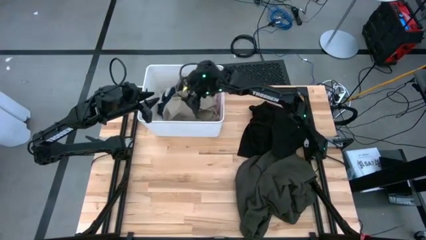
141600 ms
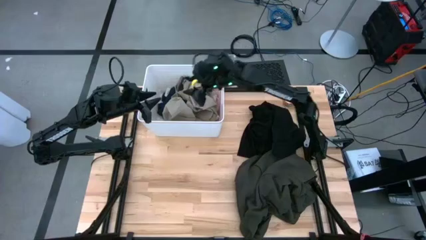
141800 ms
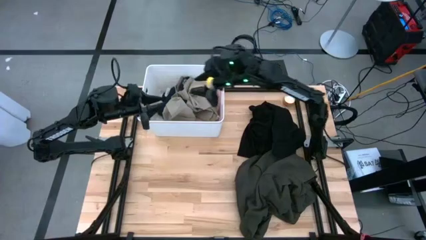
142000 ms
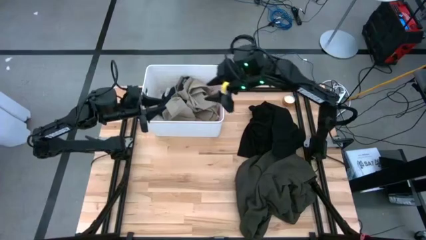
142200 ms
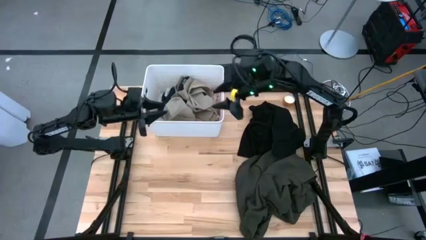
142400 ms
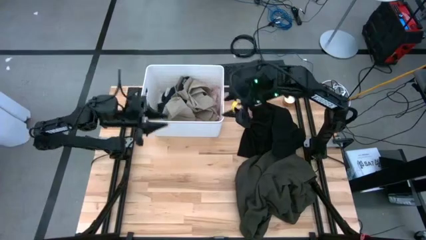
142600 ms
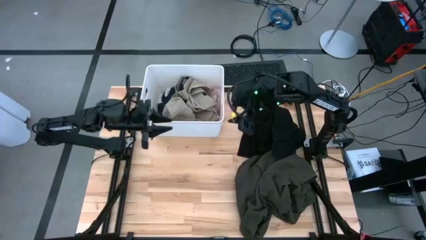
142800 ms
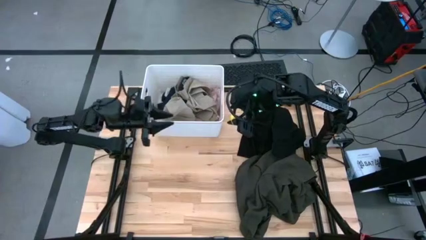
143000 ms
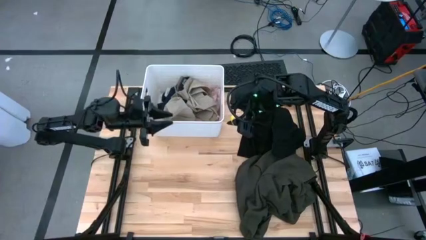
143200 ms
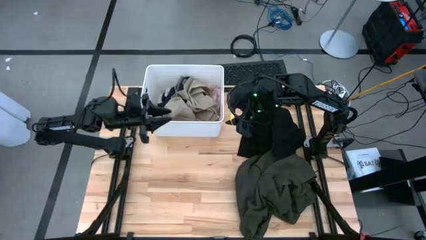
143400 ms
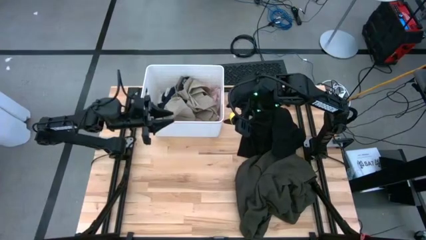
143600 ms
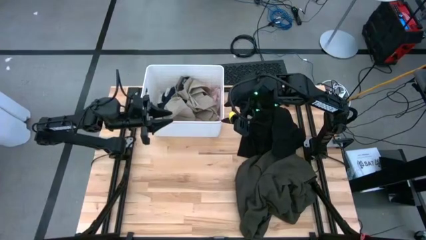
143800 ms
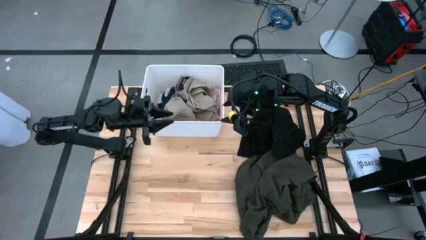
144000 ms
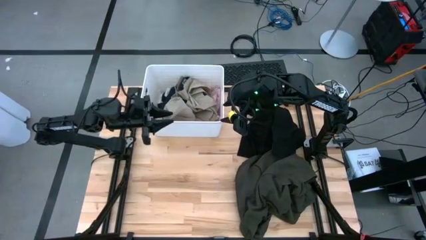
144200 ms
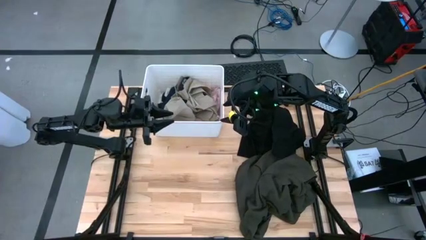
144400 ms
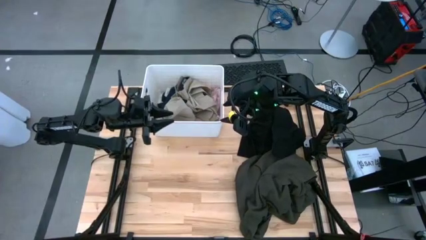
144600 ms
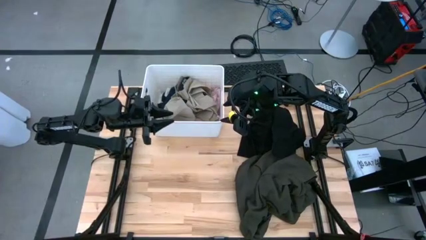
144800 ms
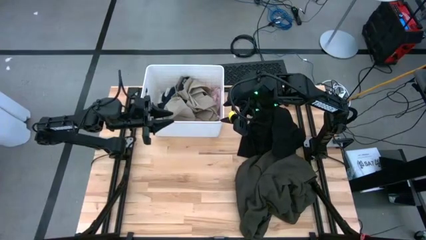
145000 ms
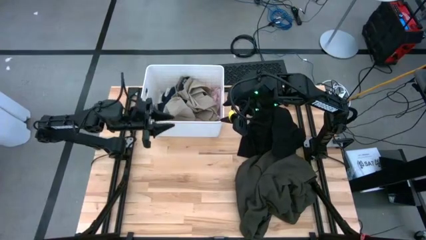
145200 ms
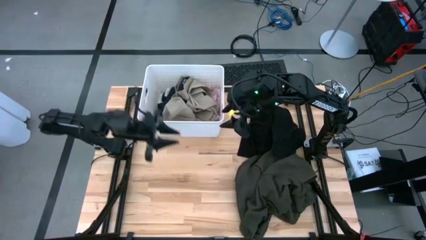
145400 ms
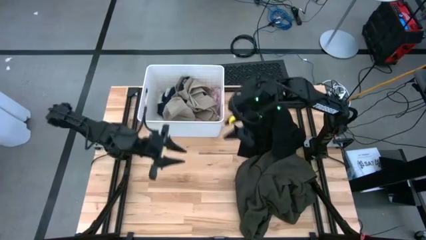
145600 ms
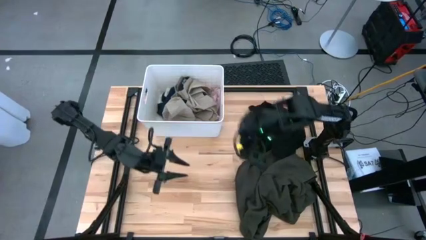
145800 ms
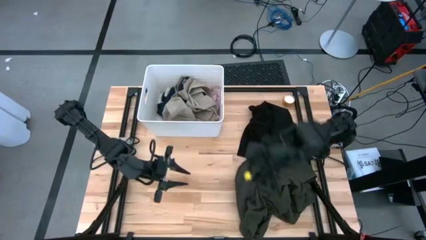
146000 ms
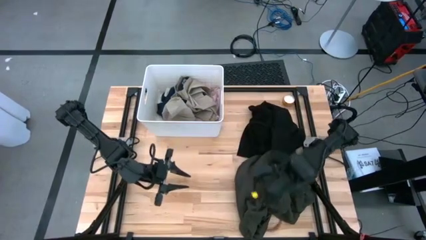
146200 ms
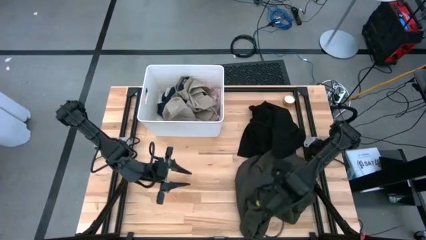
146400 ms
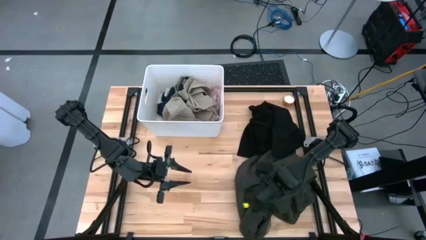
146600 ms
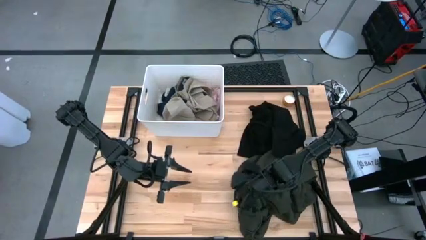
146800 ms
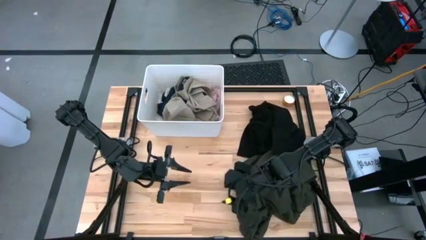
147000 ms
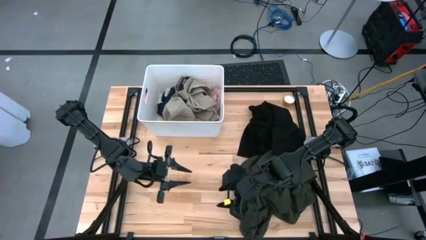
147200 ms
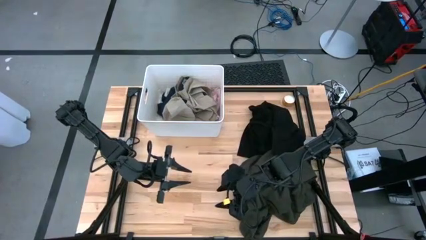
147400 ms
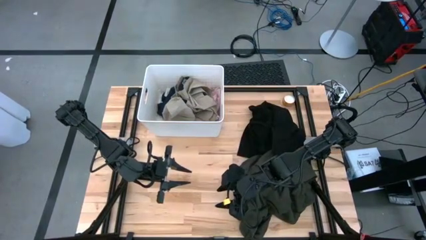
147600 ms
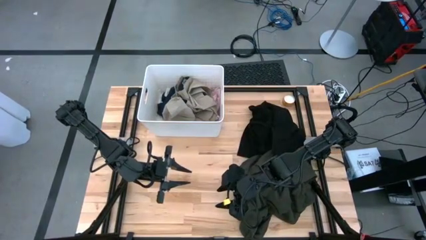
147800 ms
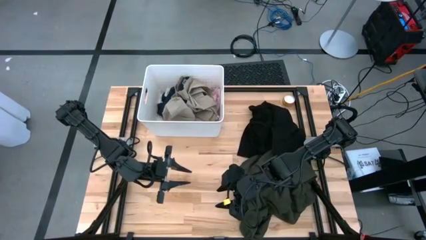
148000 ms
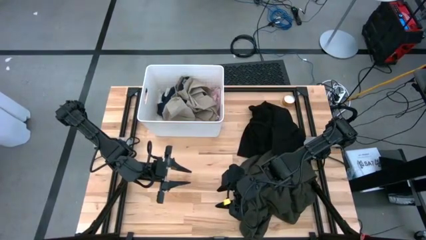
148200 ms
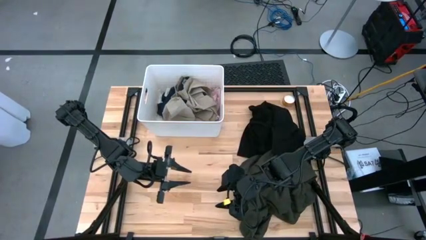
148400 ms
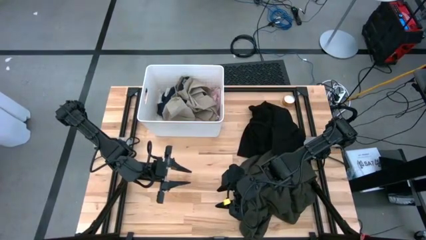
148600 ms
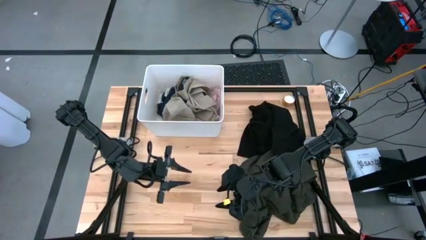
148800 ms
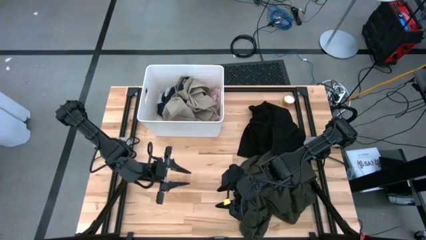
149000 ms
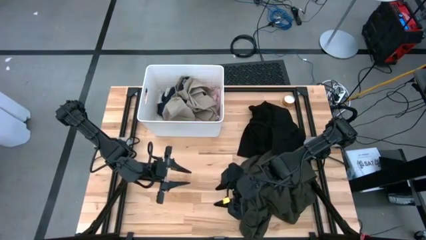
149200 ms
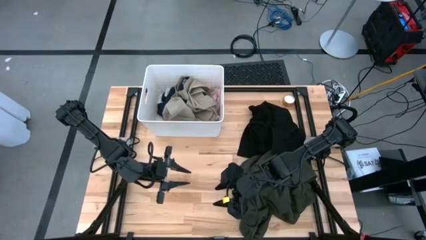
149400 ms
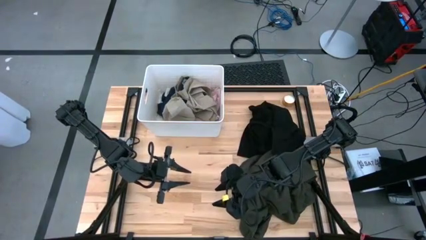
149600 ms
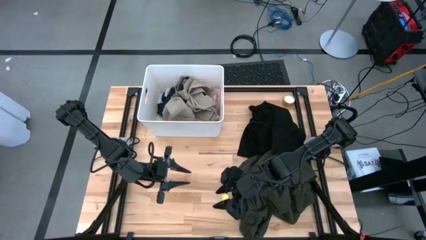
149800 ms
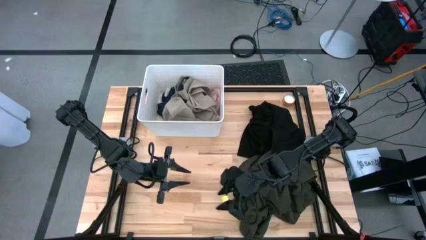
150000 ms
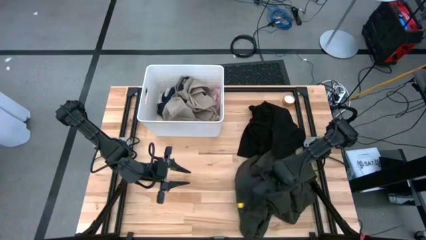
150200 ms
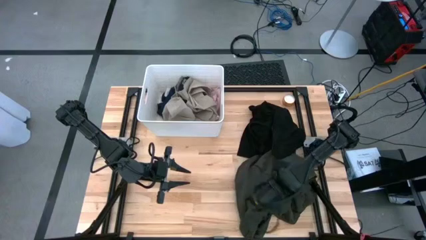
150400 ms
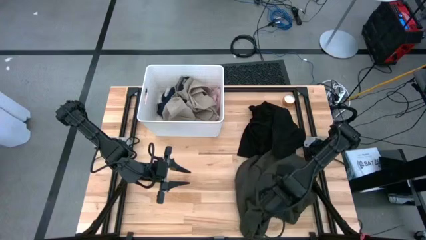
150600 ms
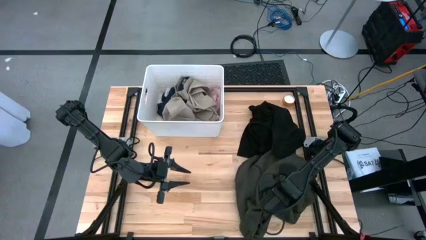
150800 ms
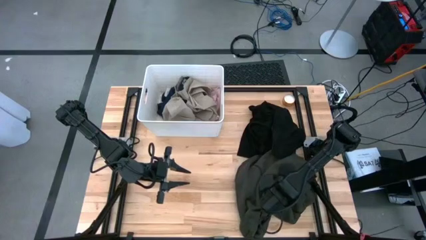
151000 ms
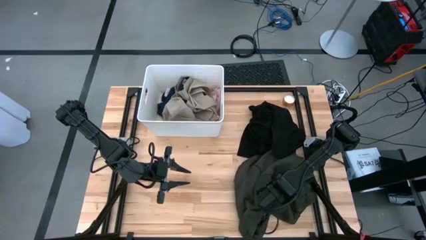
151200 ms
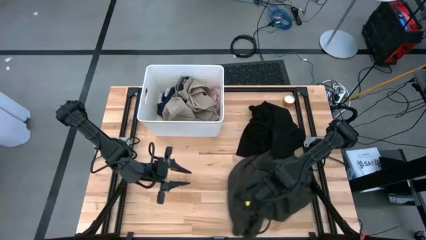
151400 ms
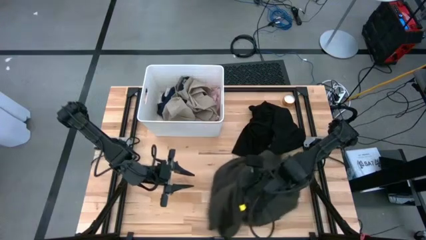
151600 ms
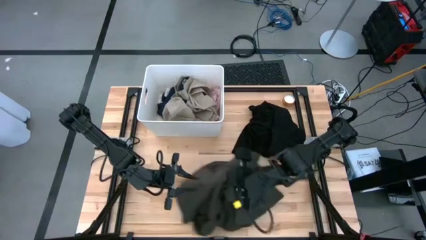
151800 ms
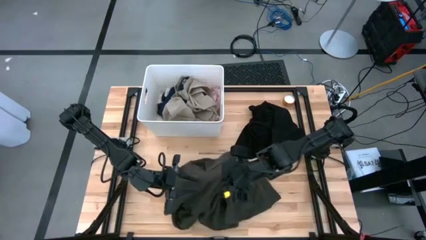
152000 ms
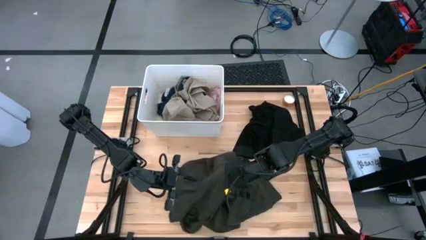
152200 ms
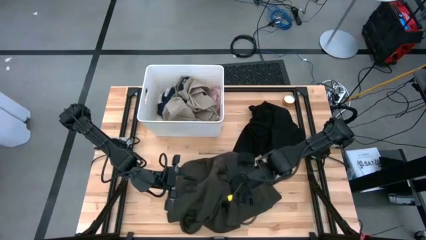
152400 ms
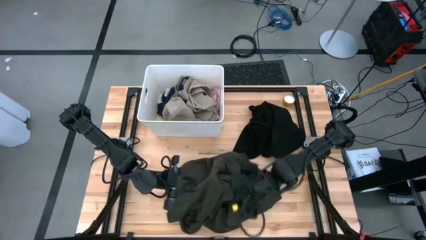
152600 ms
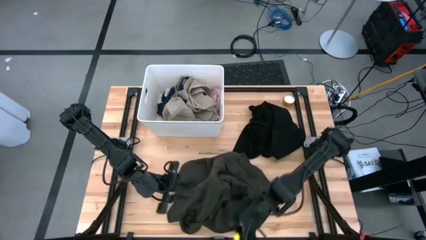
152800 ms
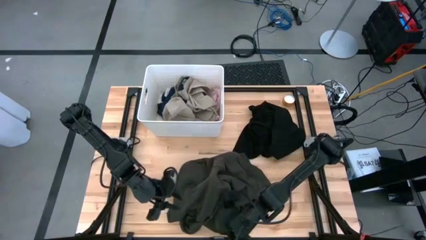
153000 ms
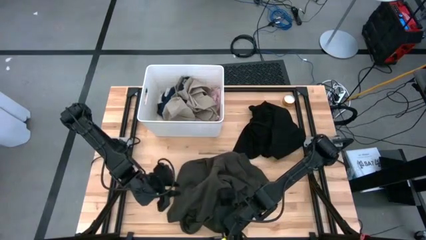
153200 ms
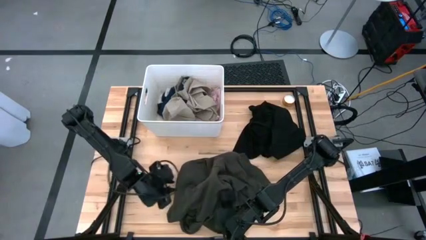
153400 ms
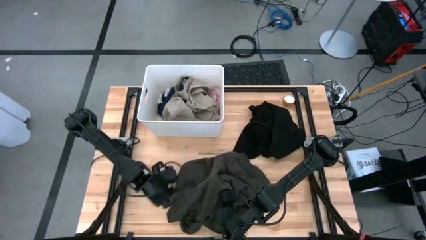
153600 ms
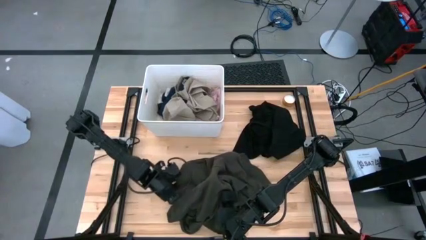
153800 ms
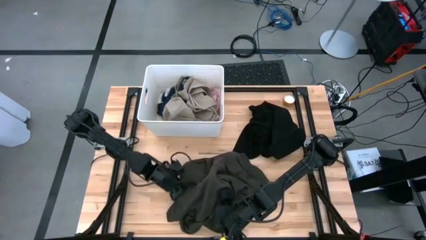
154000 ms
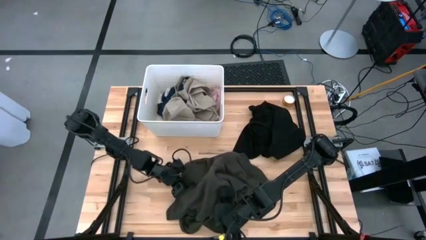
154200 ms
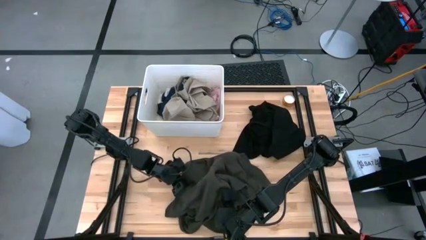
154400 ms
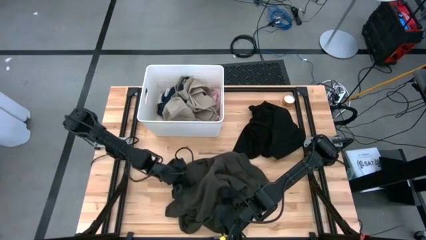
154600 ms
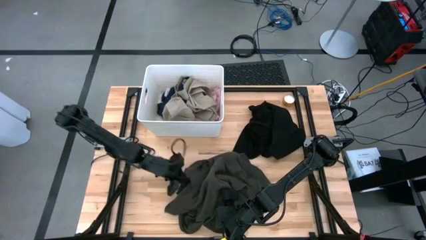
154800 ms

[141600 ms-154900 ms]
Task: Sort clothes
Put the black hoodie into the white laundry bin

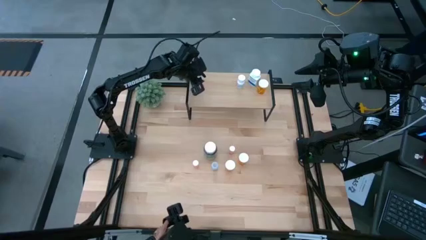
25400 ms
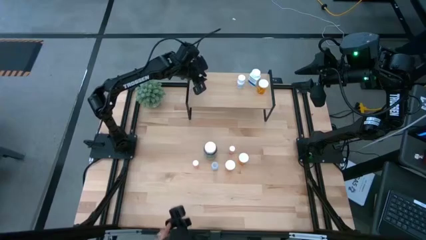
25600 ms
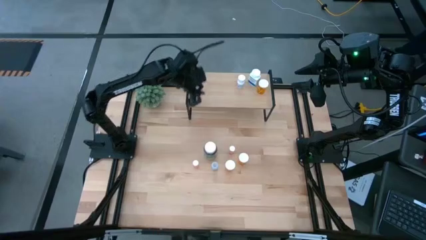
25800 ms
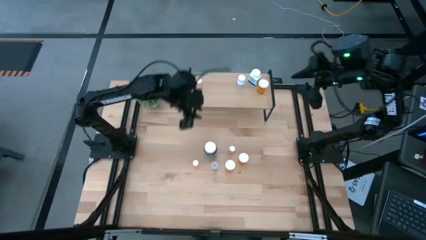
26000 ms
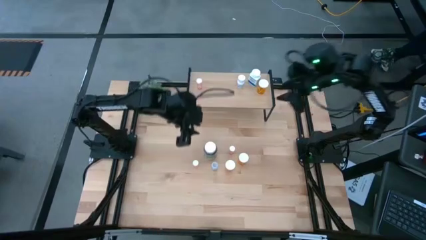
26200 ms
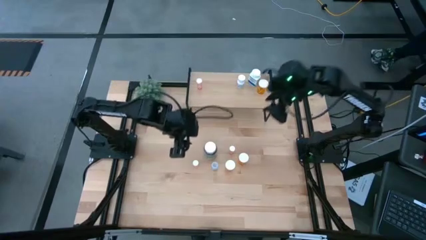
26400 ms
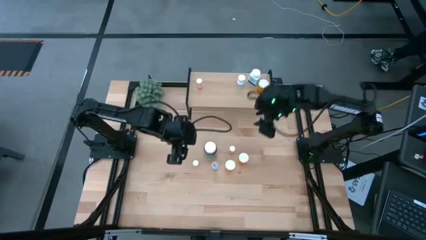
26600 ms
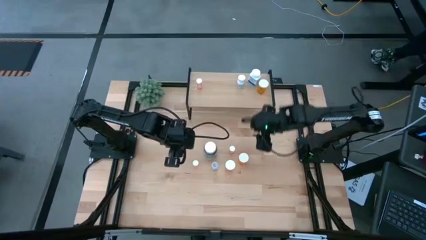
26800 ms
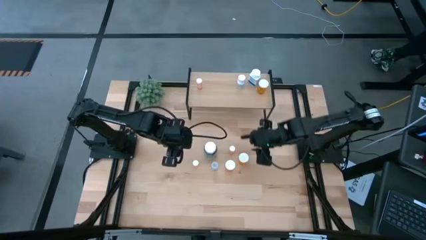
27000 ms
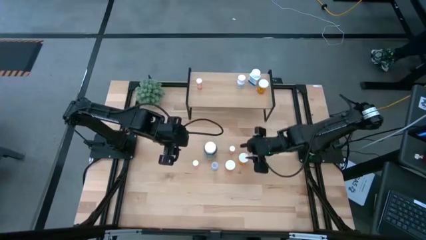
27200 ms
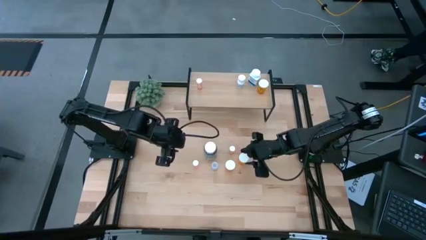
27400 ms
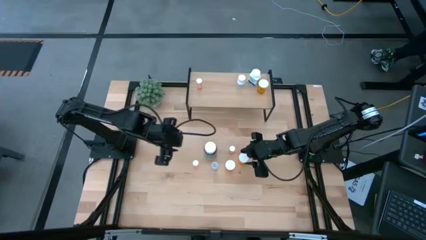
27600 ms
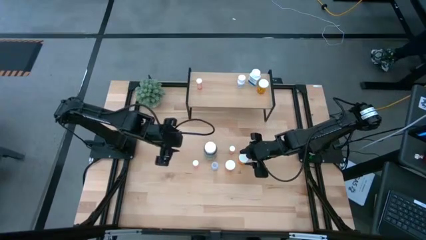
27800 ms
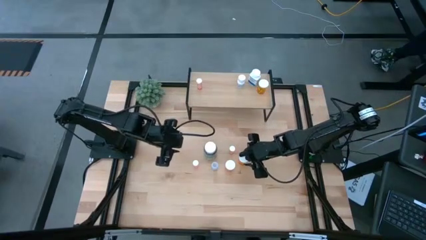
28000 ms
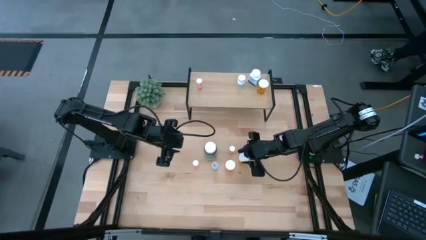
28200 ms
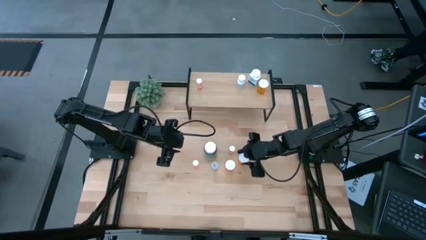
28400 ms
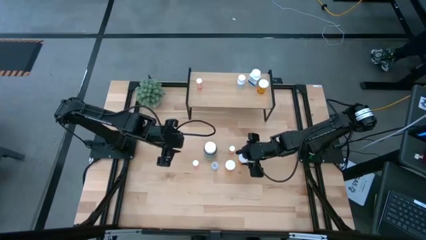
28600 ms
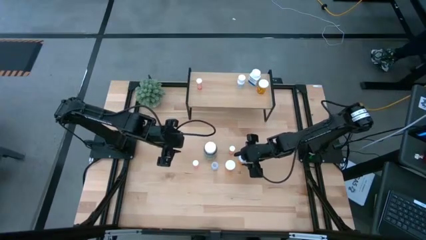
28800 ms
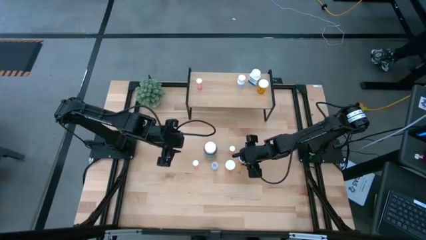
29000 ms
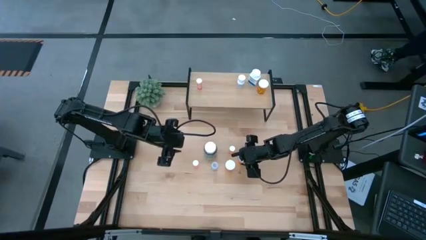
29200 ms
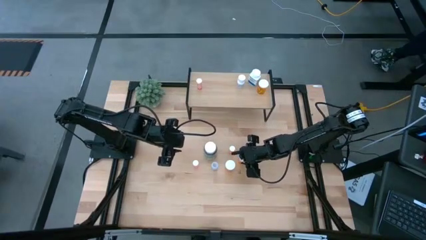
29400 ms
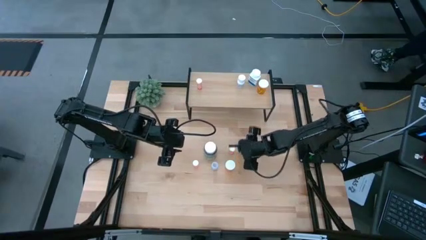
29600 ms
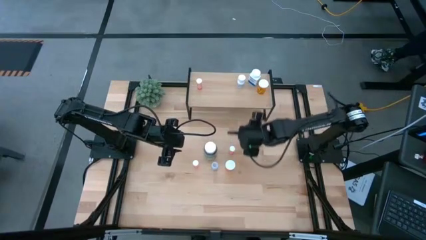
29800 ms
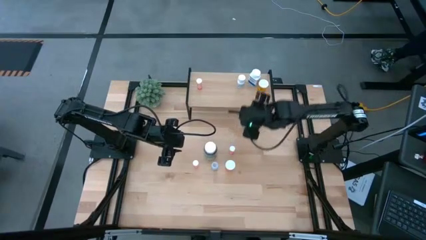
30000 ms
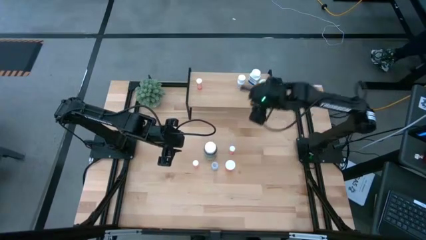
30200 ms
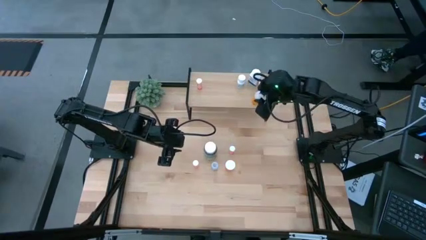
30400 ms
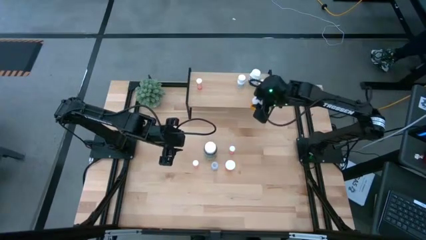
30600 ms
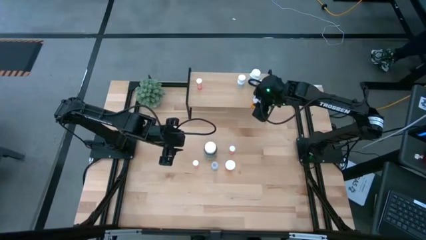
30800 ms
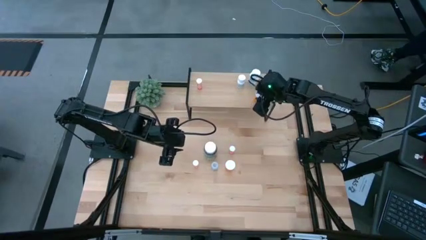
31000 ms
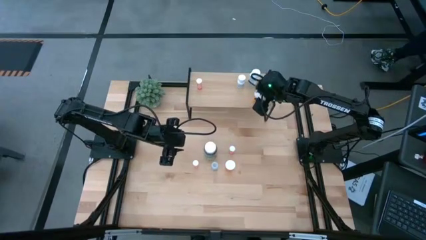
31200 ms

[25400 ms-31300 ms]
Task: Pick and place medicine bottles onto shelf by color
Put the right orange pill bottle on the shelf aligned with the other orange pill bottle
